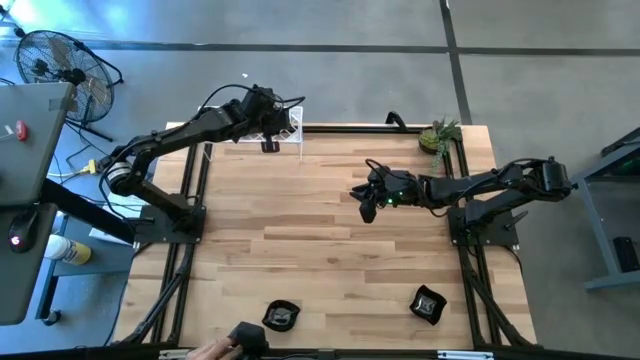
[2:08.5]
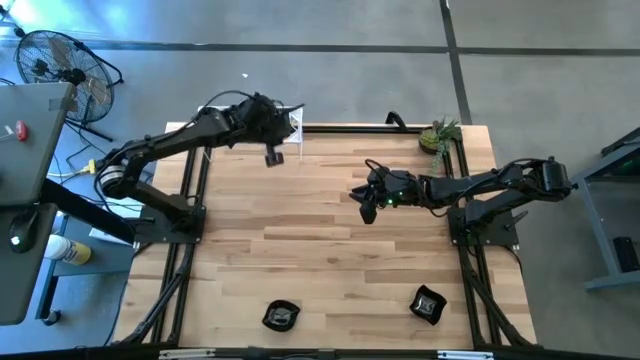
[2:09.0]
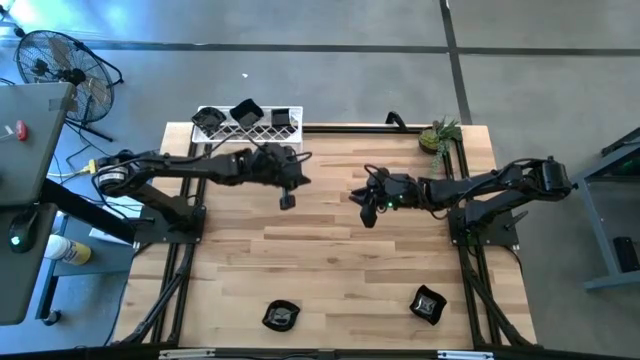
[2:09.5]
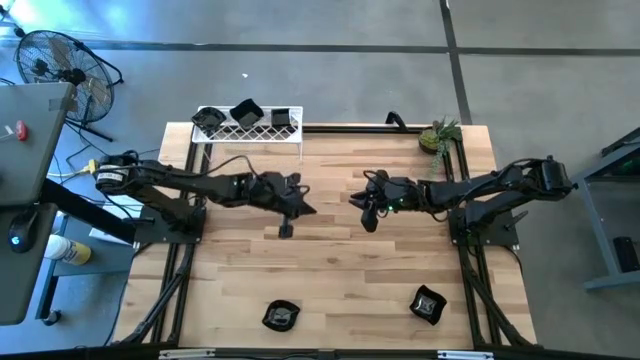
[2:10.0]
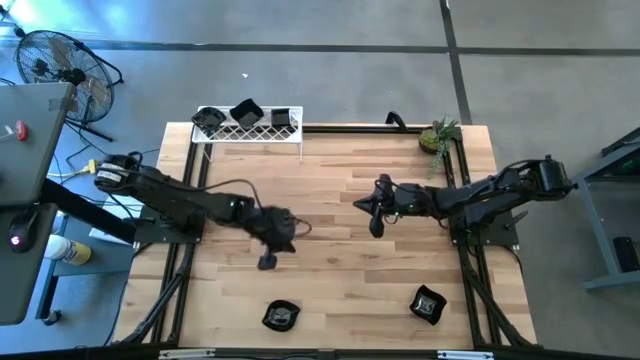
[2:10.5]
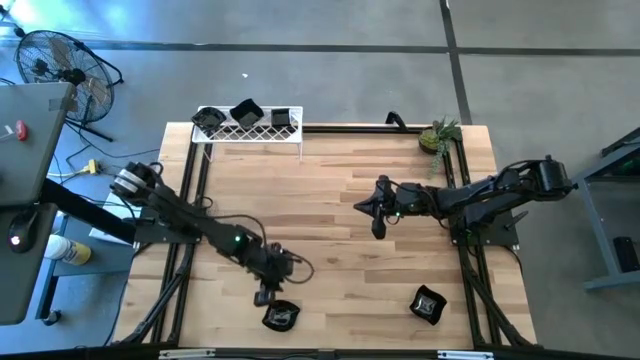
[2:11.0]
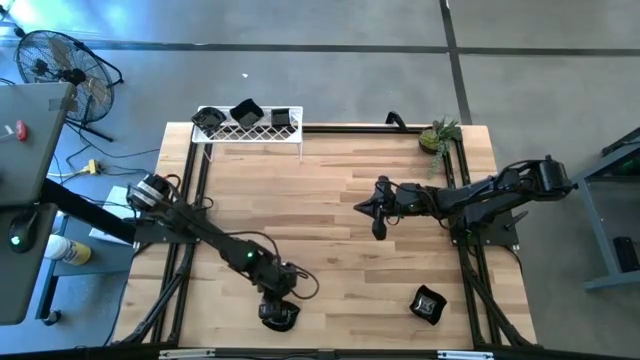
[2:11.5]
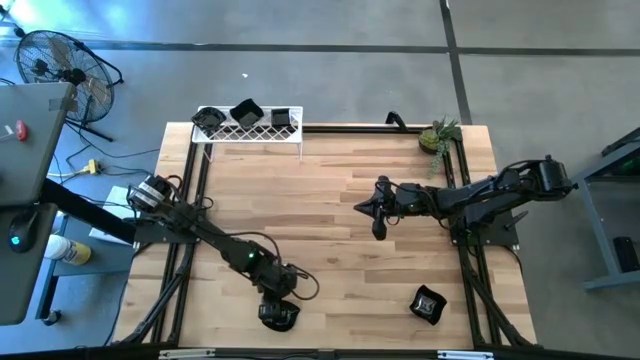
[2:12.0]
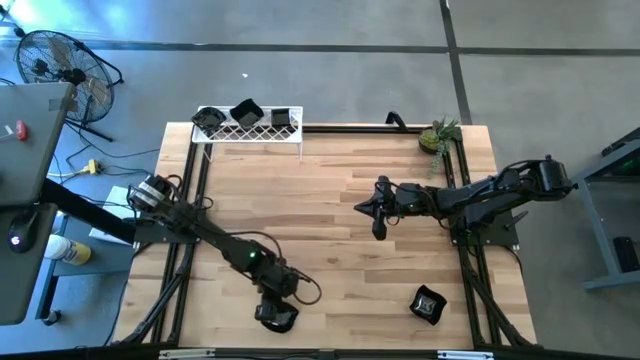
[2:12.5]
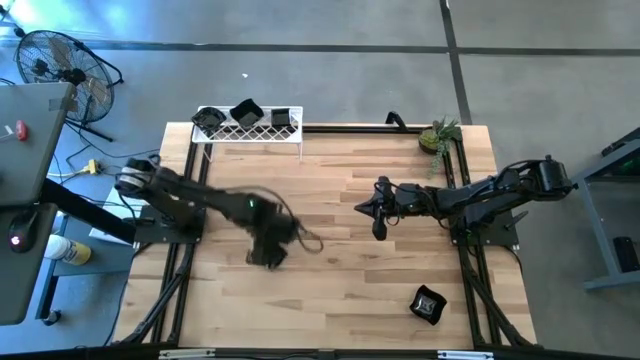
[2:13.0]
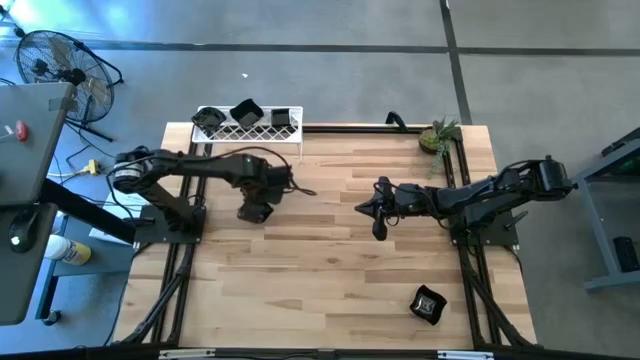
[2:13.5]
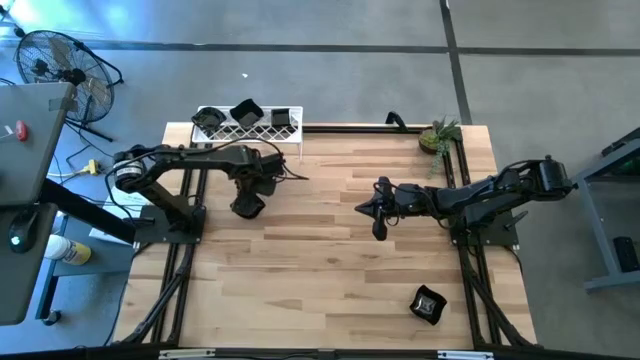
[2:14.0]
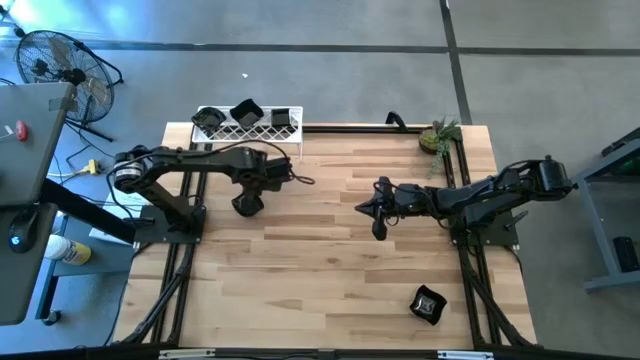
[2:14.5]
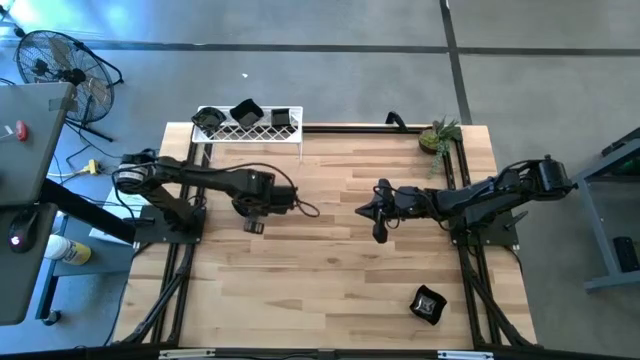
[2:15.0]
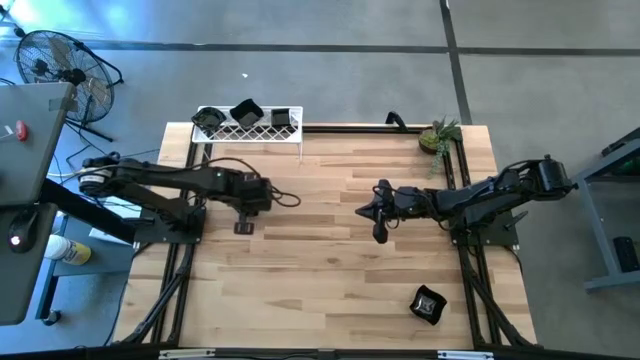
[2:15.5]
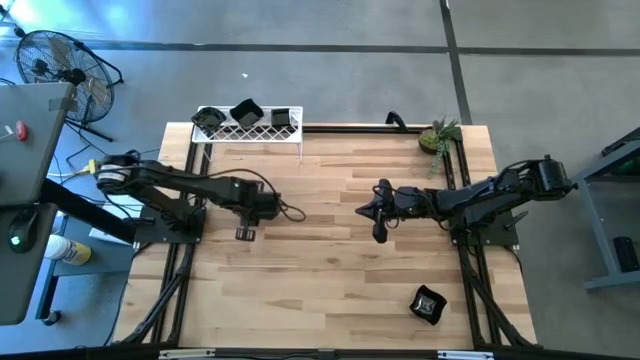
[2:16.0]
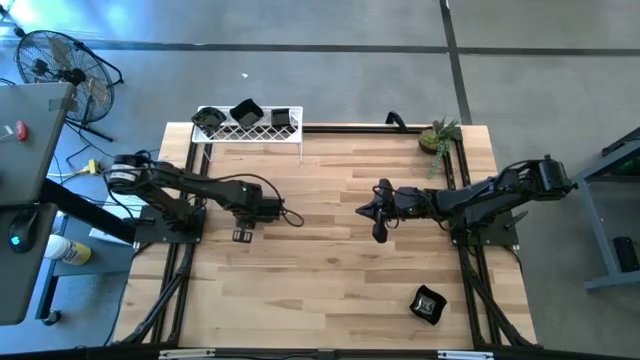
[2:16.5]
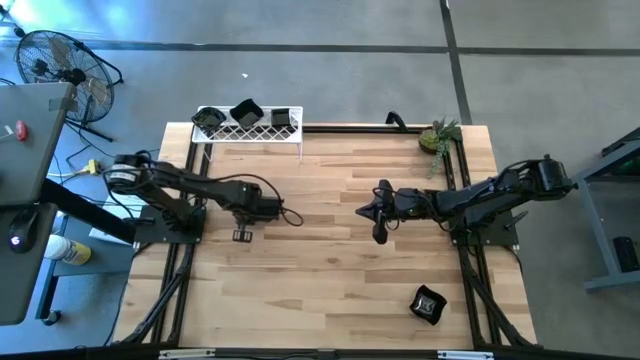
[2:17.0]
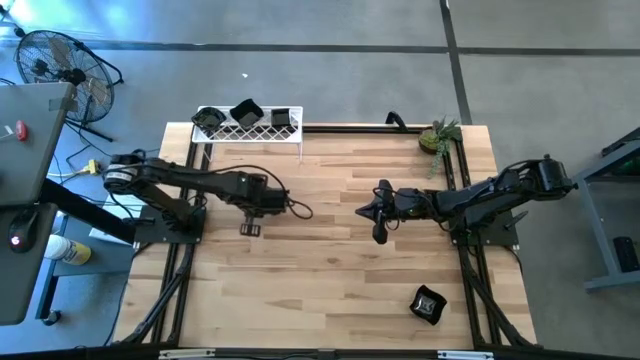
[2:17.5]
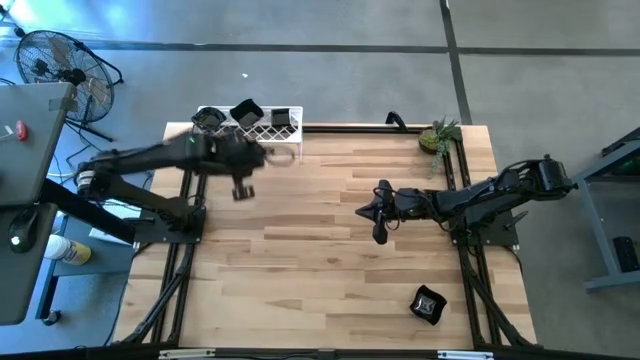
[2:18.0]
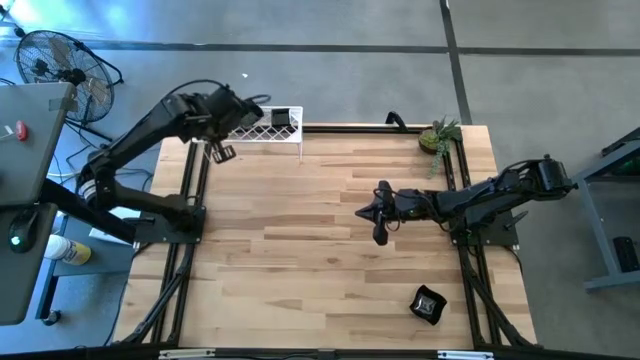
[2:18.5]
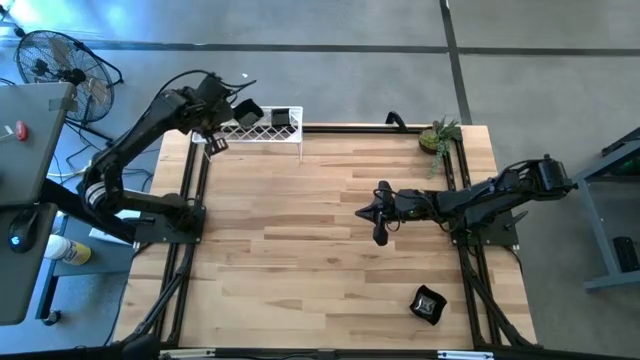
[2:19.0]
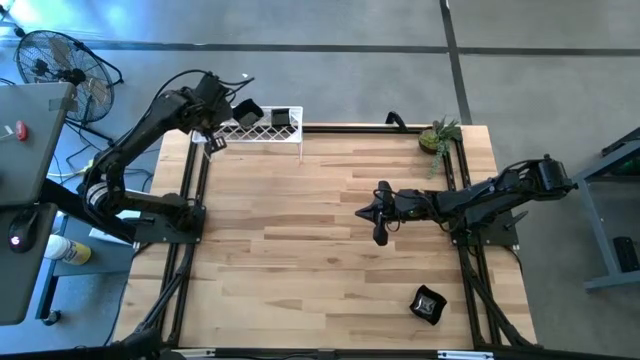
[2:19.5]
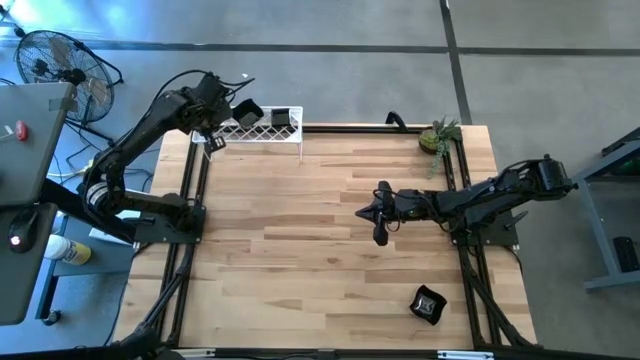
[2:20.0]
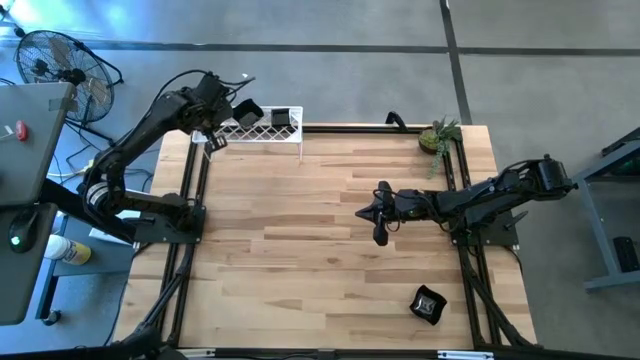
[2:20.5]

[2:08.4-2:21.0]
Task: Pick & Place Mini shaped plates
Stack the black leaf-shaped plate on top of the black leaf-shaped plate on the shelf

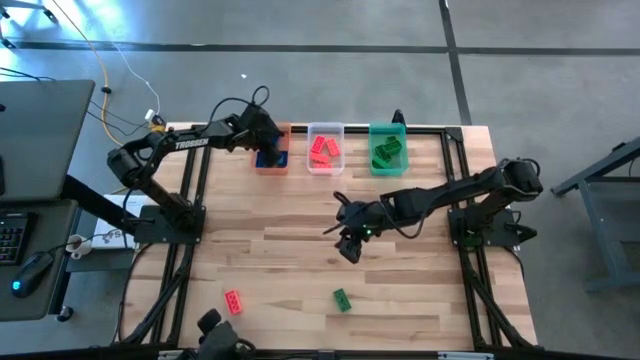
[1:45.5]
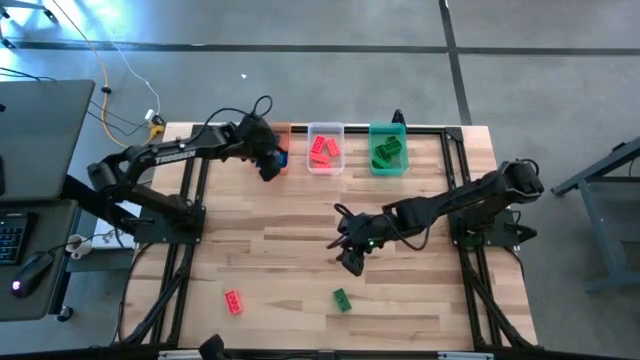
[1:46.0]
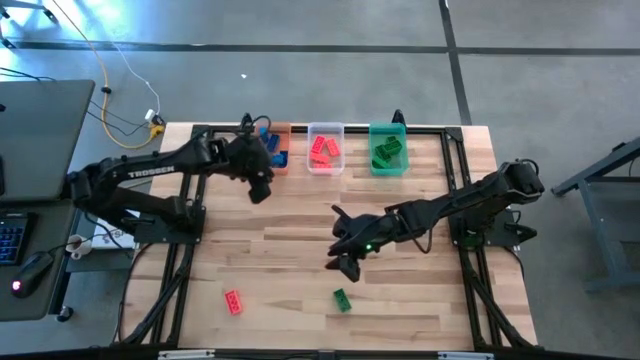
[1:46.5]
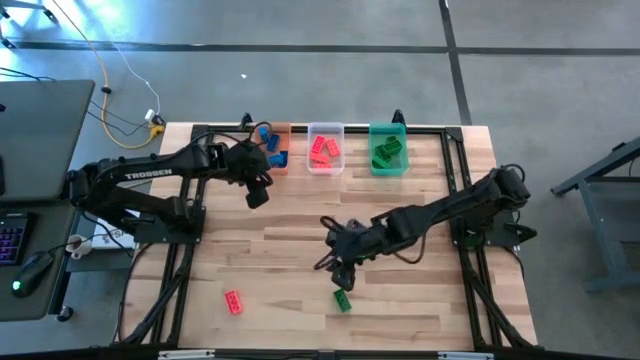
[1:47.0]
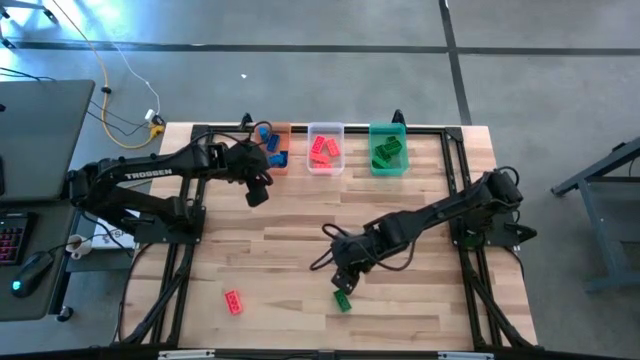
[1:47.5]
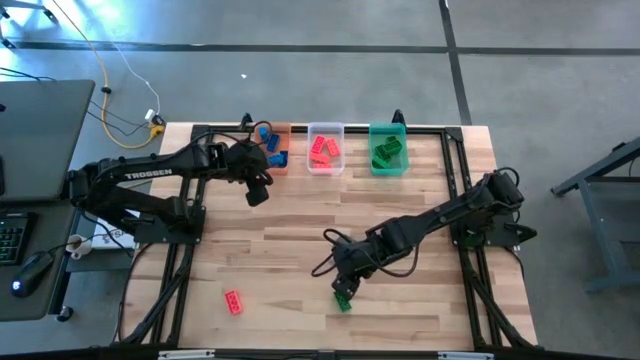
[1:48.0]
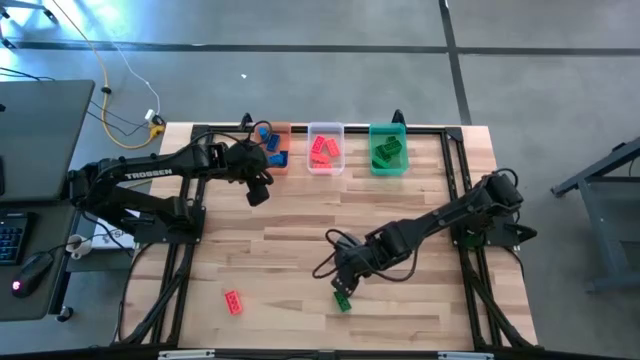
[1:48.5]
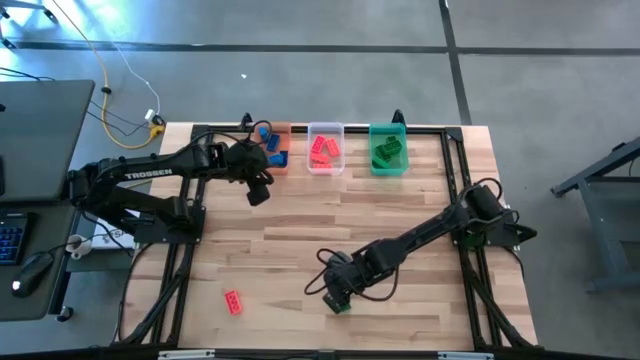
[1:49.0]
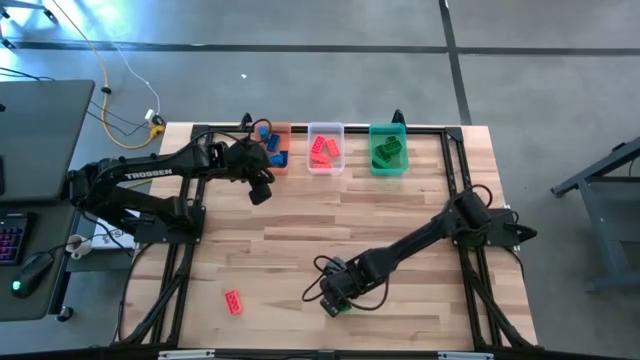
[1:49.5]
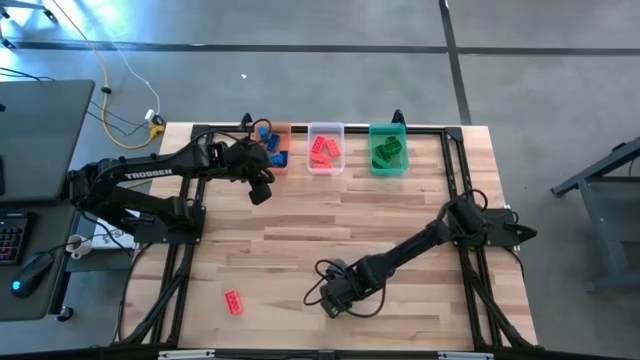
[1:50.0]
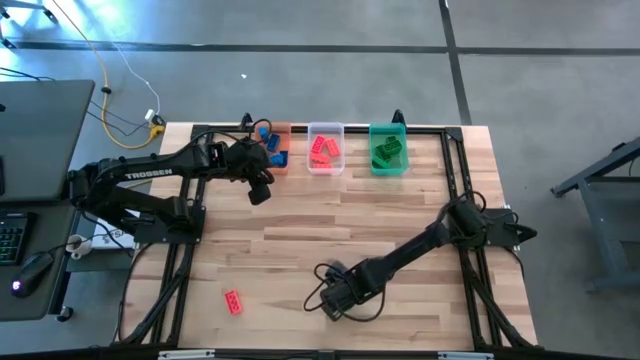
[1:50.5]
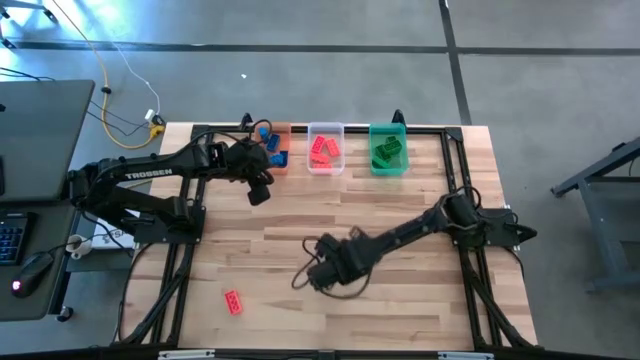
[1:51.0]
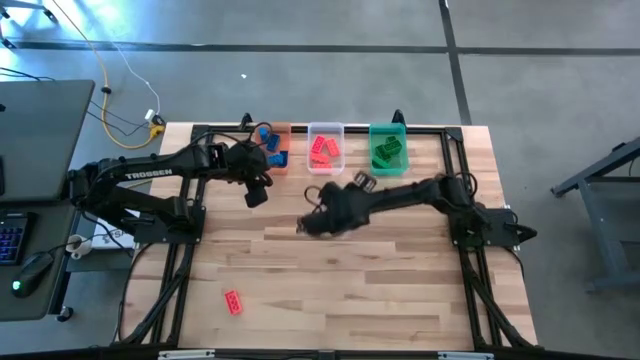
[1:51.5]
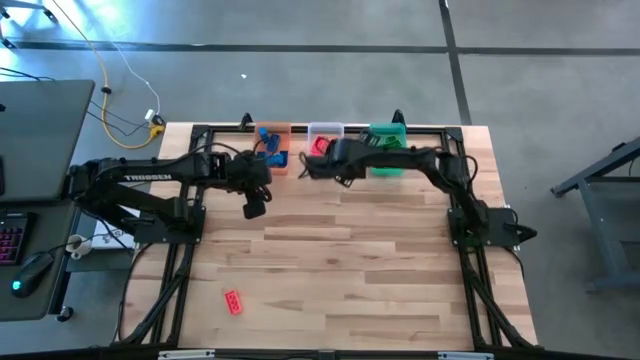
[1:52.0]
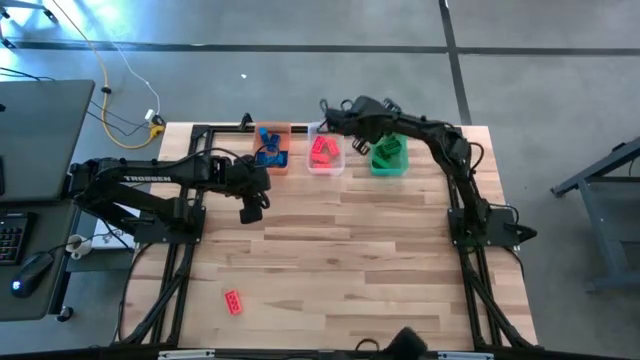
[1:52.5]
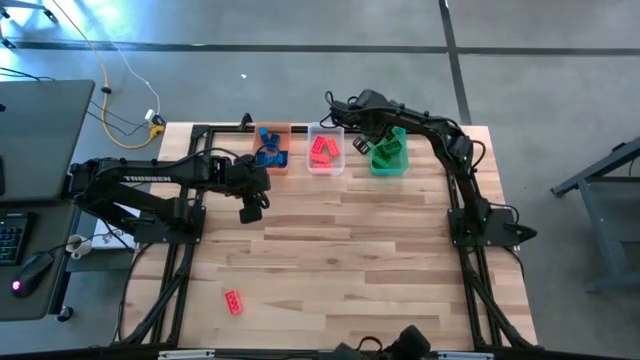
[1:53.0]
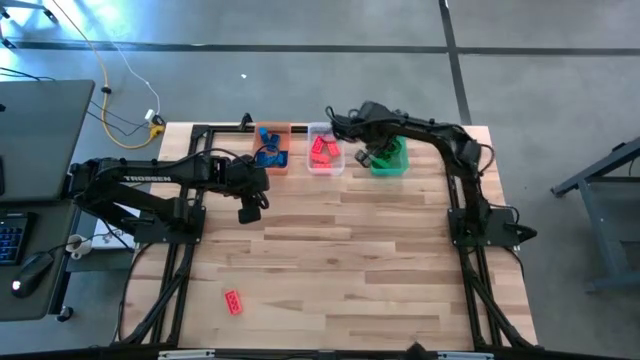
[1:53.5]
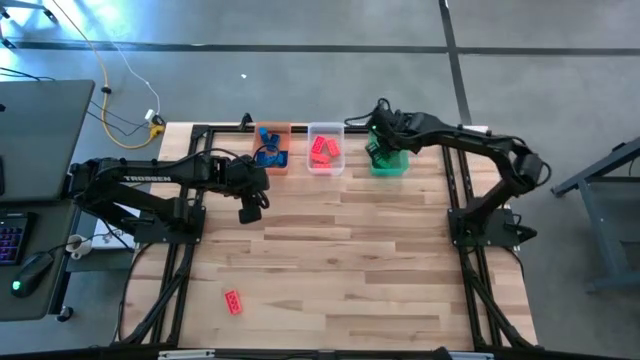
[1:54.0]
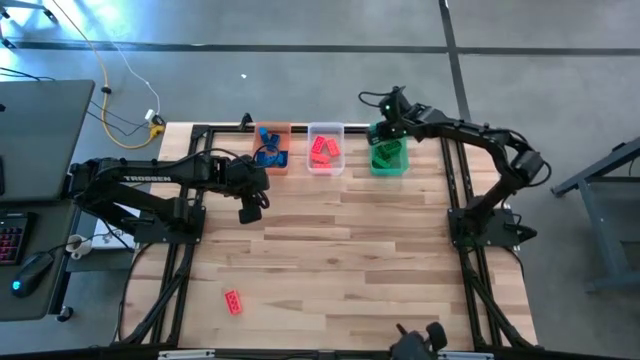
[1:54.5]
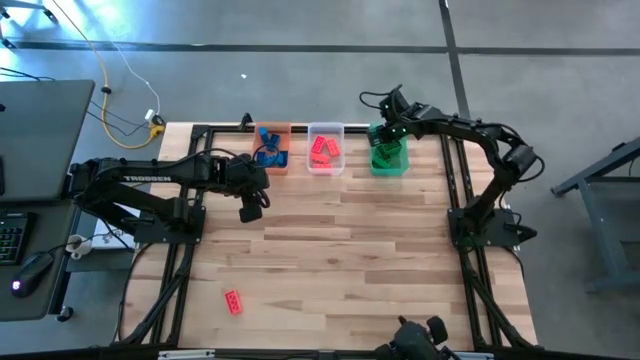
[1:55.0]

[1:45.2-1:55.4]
Task: Sort & place blocks by color
Put the green game piece into the green bin
